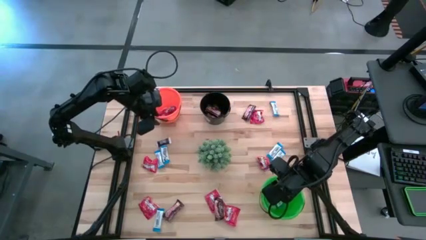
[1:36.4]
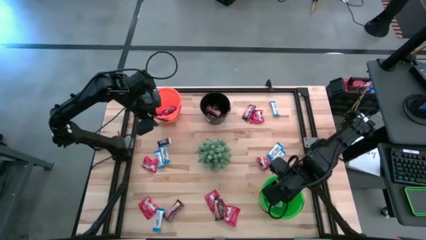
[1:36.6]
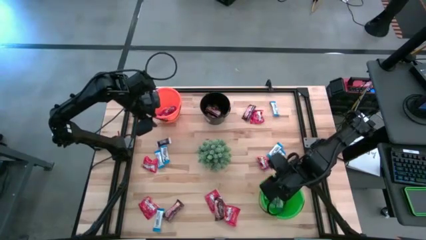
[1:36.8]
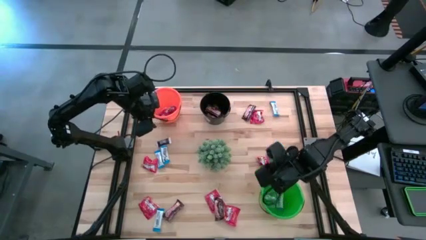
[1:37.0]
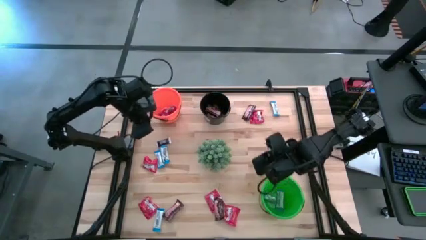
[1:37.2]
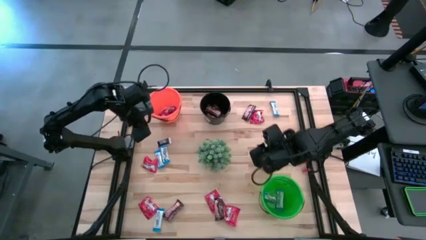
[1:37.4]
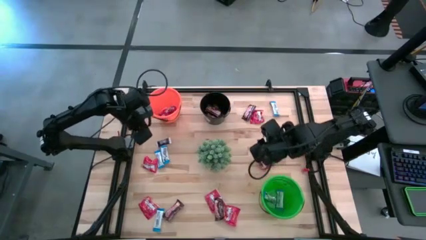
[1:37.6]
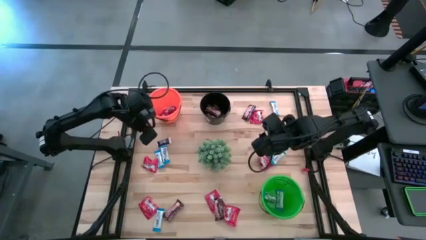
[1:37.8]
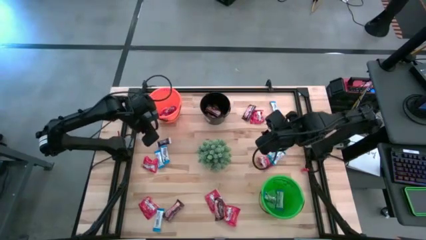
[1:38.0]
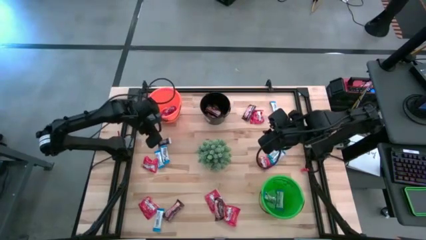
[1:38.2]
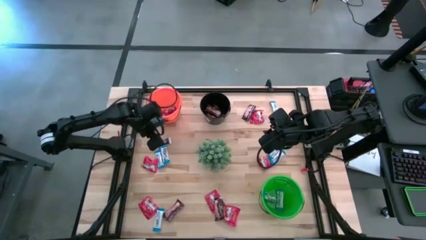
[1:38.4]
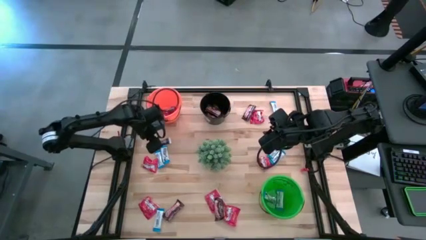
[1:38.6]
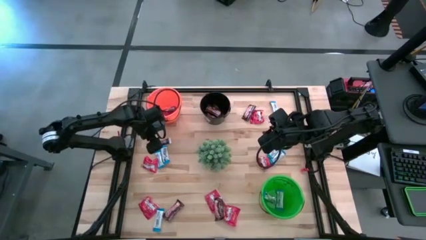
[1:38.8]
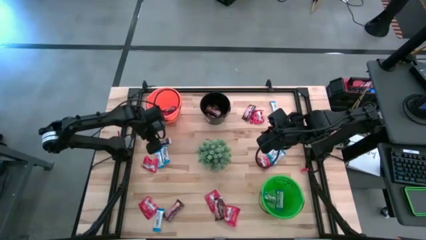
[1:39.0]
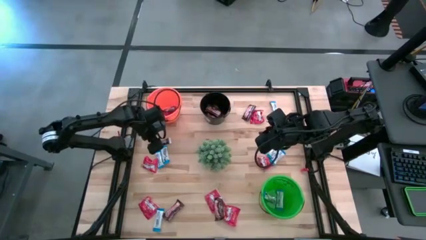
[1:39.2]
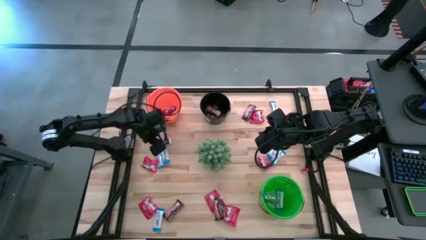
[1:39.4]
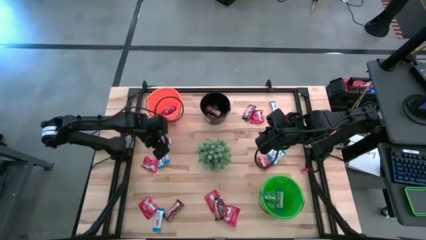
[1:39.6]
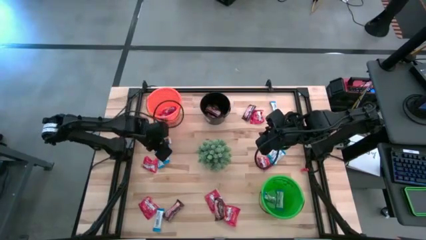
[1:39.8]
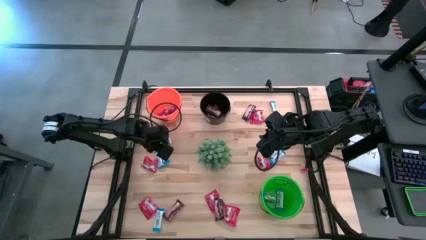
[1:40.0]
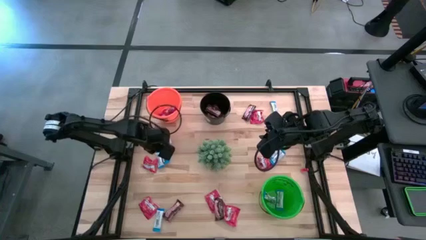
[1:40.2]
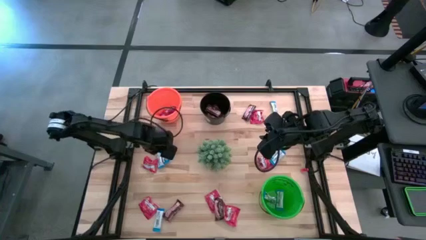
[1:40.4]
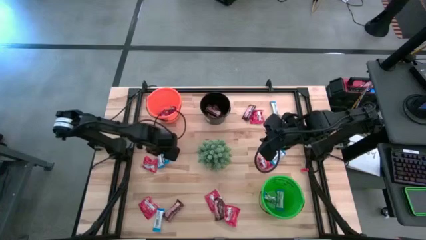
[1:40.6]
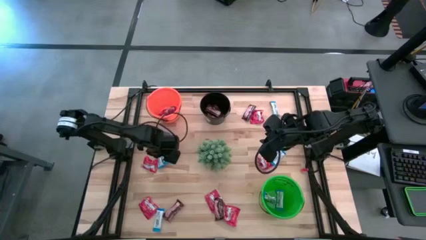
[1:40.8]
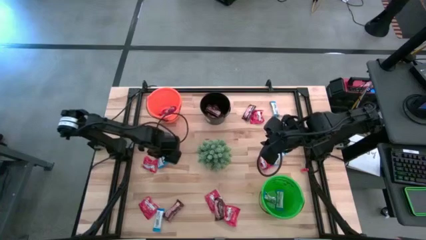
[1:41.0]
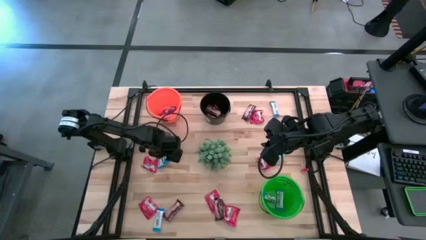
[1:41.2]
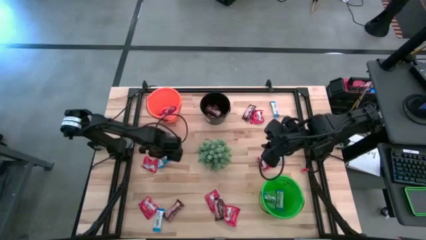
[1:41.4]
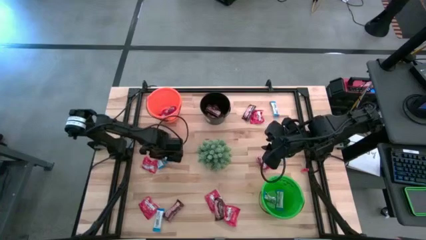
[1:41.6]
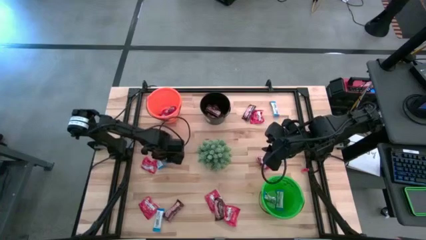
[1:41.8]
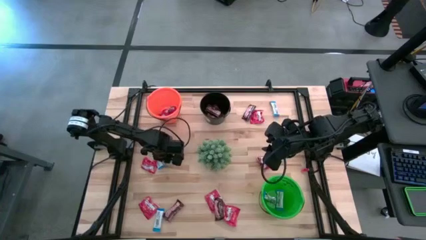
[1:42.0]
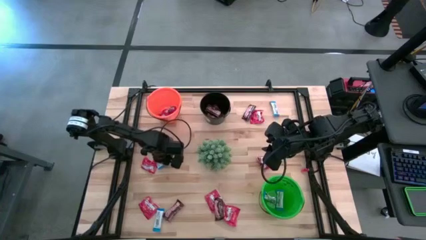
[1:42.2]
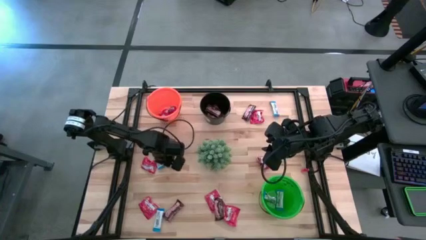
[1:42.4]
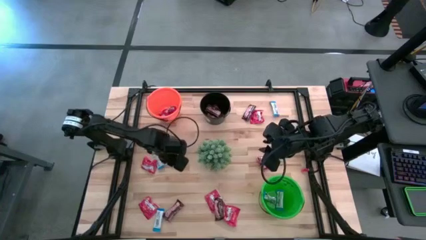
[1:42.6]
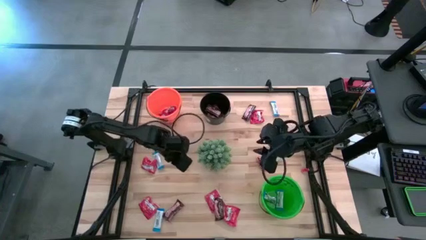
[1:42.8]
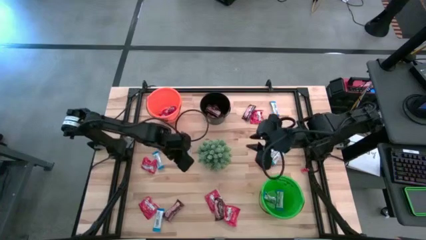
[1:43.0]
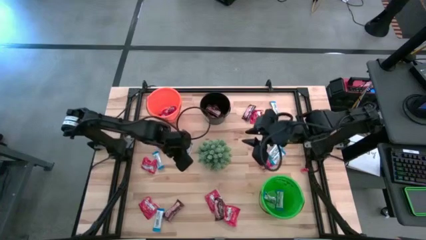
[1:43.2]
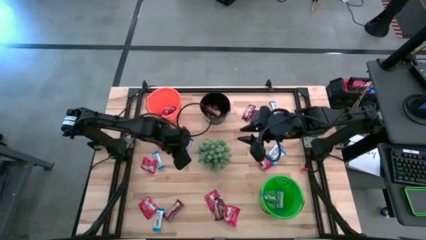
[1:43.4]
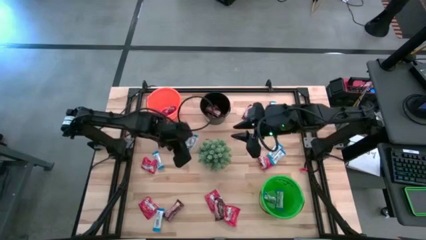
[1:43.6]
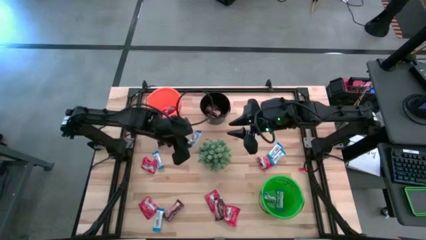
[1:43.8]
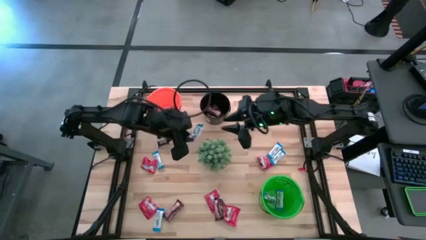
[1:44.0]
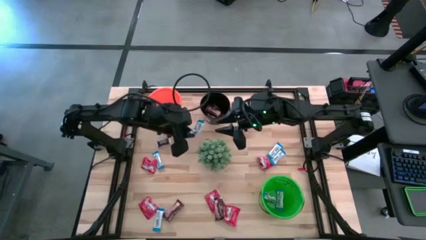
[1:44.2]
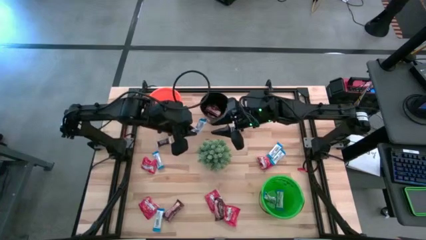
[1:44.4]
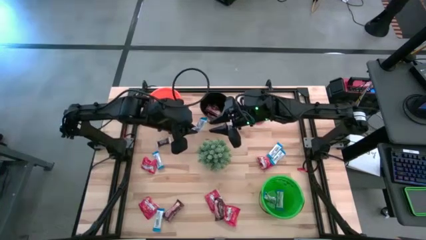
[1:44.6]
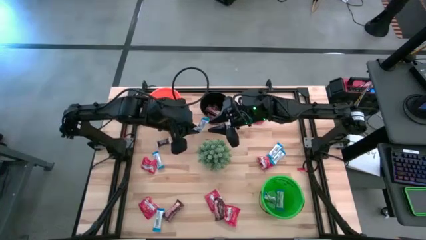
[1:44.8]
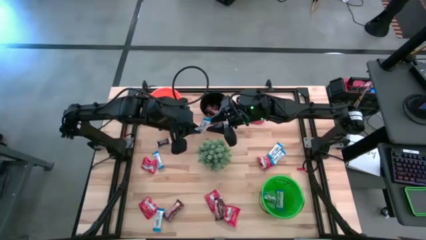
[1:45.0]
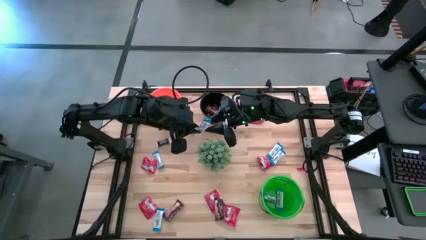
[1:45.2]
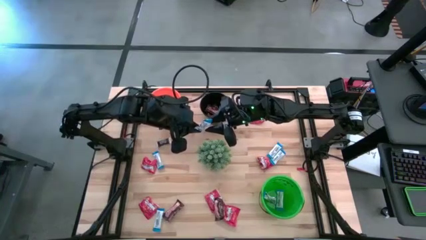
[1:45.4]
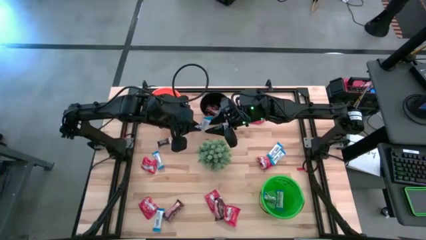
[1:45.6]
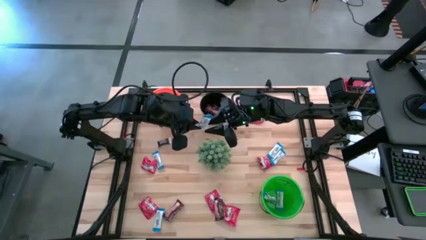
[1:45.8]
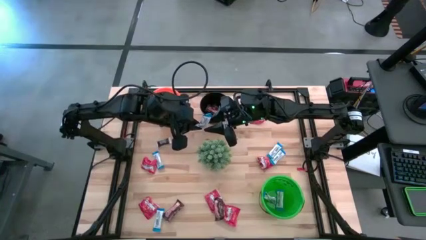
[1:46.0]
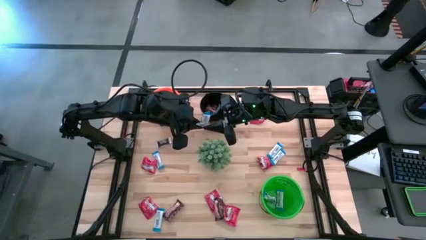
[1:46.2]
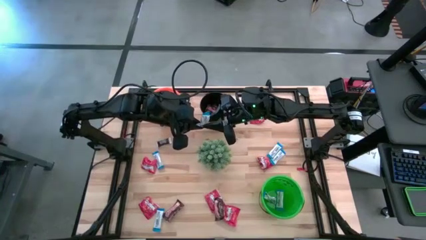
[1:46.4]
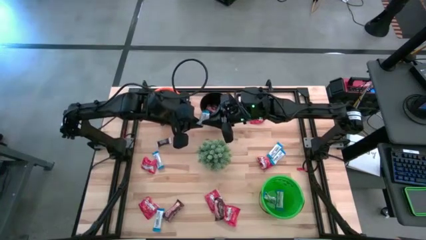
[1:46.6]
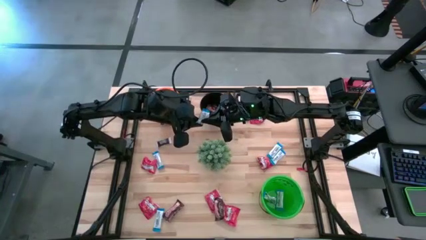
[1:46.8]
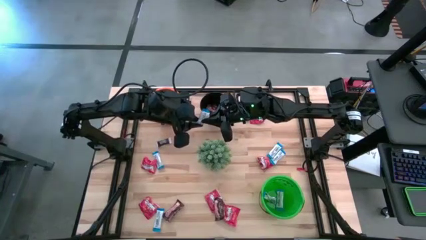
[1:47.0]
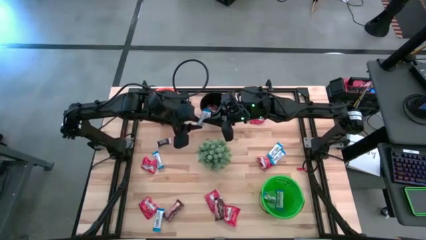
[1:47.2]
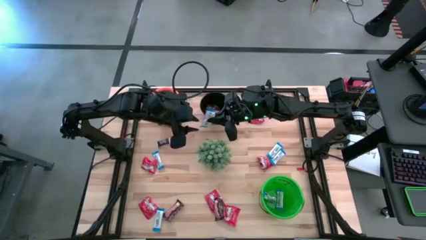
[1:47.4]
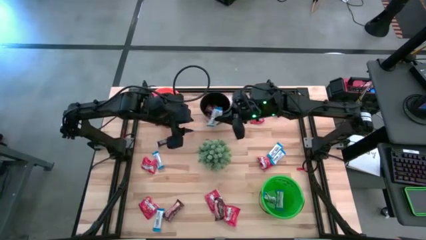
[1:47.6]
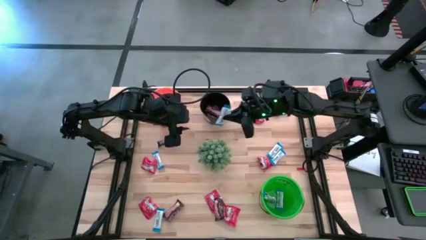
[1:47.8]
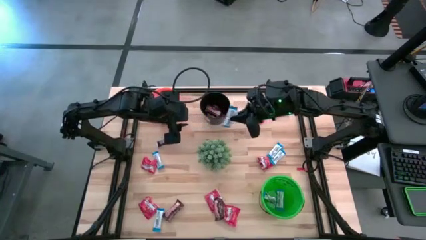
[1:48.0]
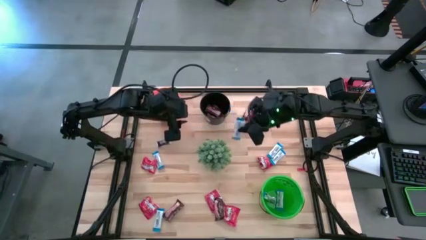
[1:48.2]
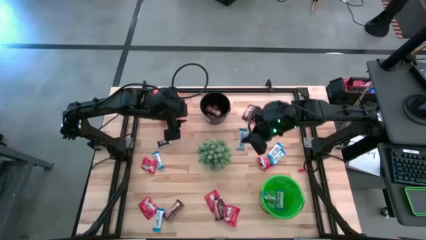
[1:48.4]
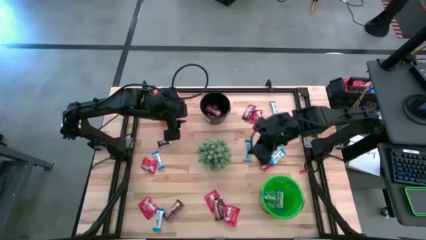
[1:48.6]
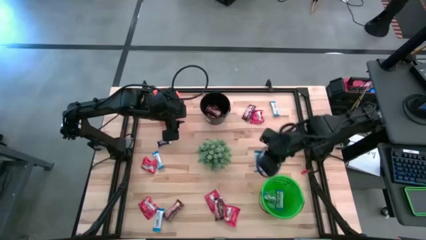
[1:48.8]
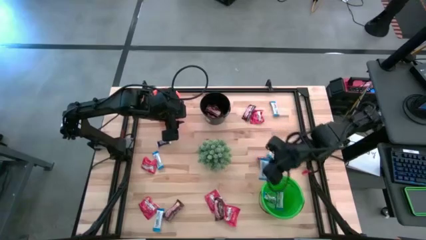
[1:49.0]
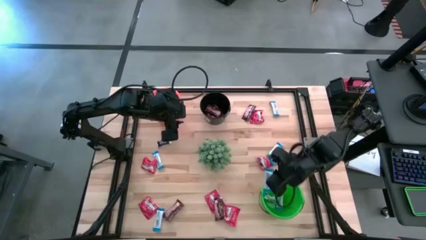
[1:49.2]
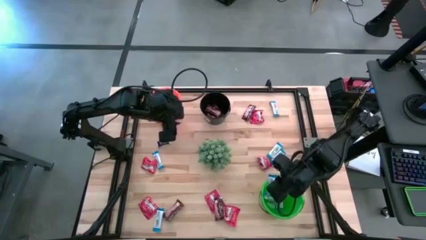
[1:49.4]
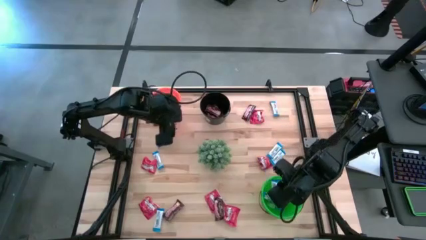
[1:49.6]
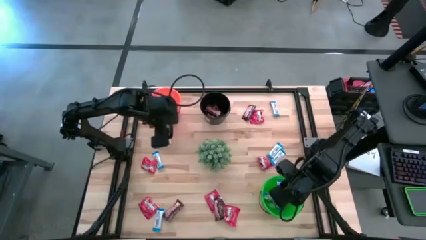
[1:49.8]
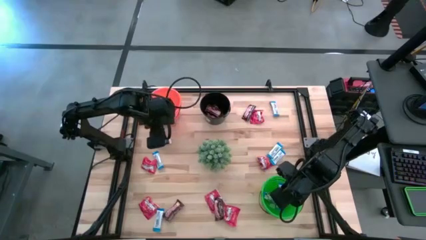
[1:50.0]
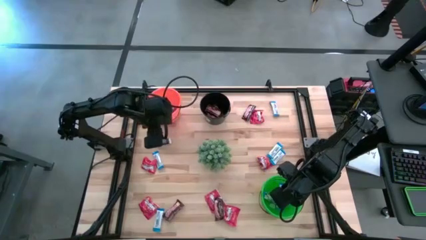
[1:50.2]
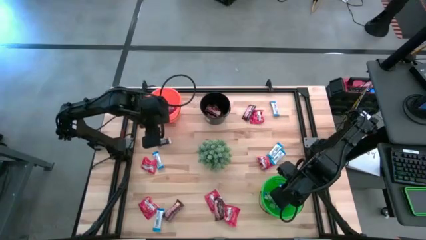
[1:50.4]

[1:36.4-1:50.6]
Task: Sort candy
Put the blue chocolate into the green bucket
